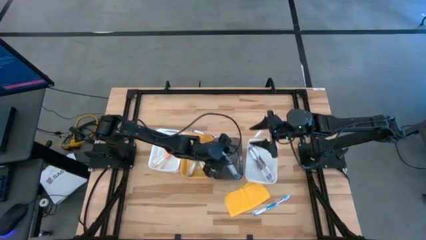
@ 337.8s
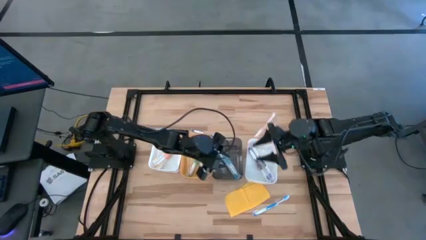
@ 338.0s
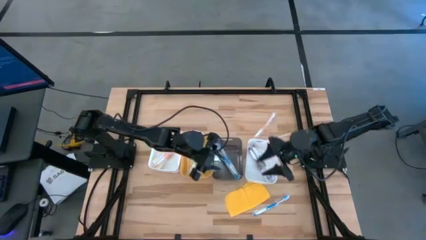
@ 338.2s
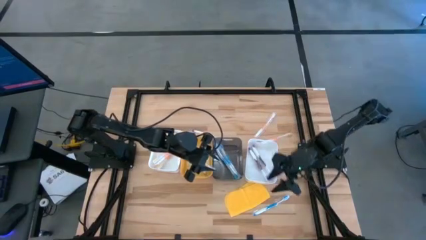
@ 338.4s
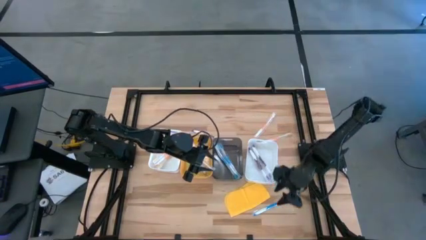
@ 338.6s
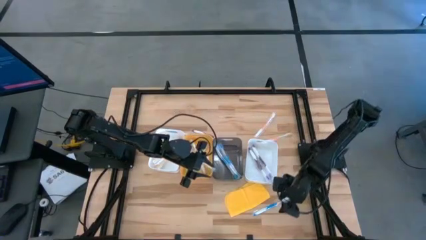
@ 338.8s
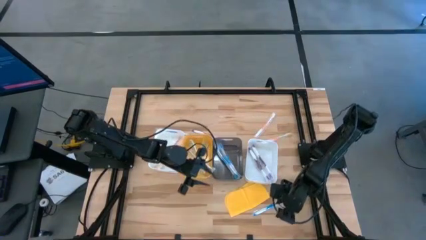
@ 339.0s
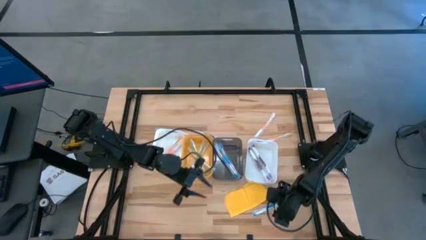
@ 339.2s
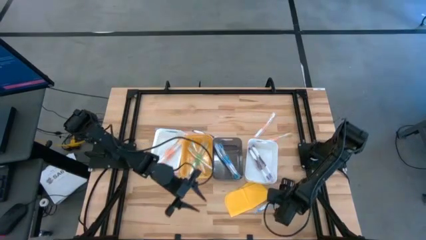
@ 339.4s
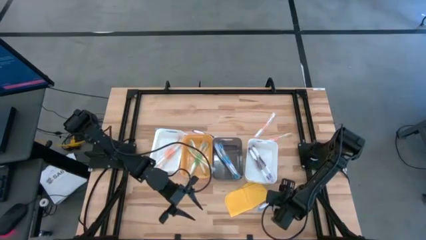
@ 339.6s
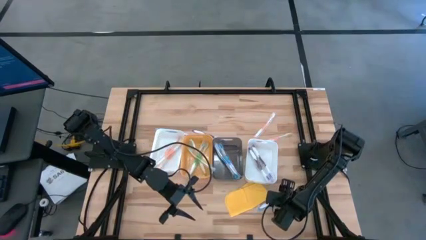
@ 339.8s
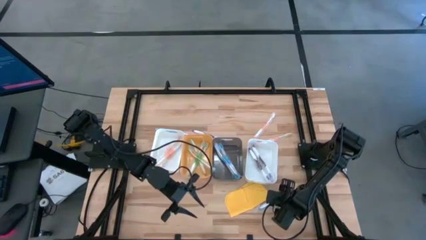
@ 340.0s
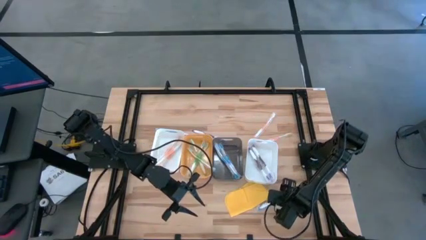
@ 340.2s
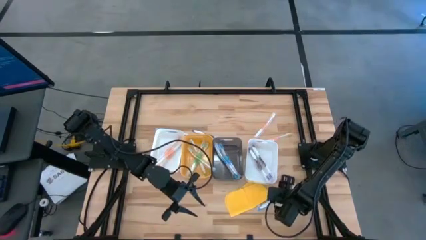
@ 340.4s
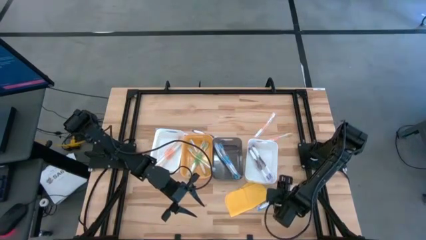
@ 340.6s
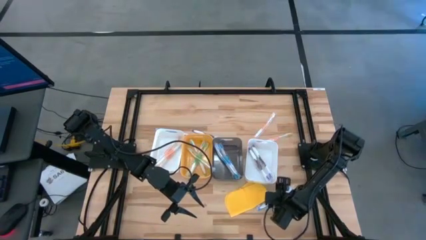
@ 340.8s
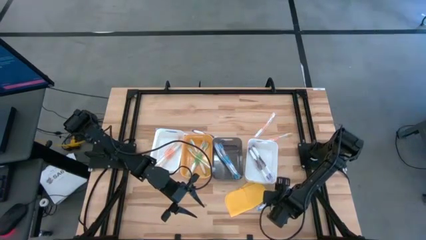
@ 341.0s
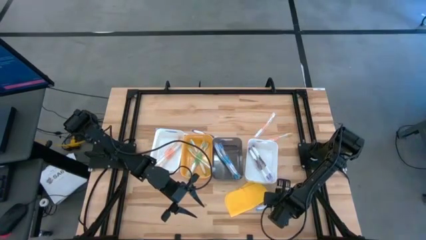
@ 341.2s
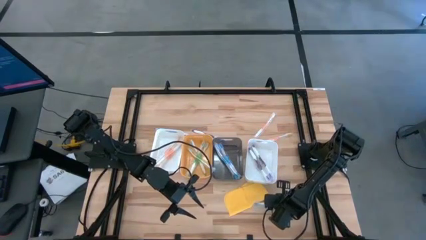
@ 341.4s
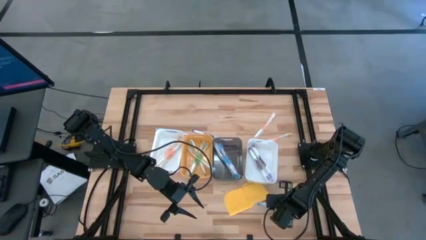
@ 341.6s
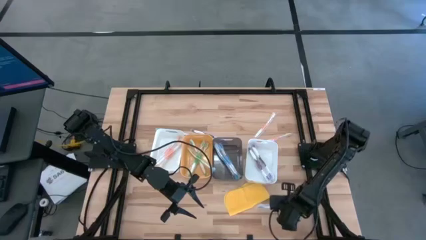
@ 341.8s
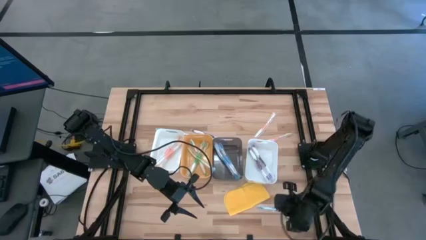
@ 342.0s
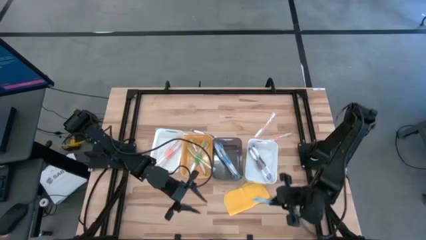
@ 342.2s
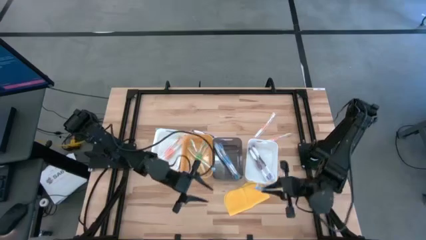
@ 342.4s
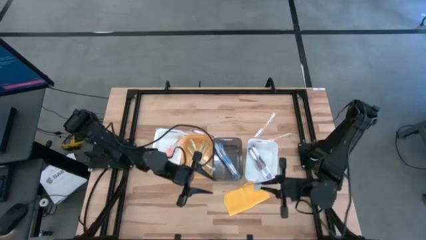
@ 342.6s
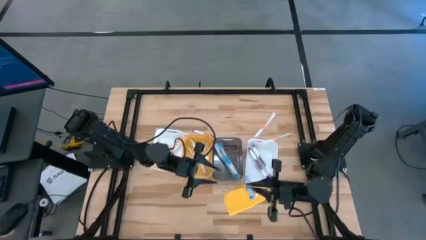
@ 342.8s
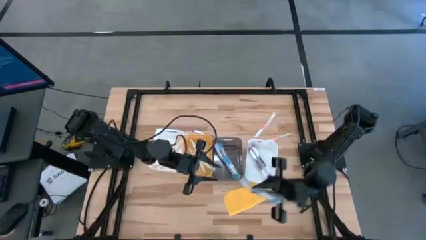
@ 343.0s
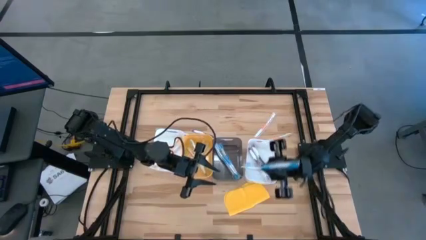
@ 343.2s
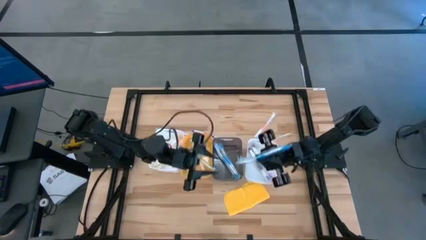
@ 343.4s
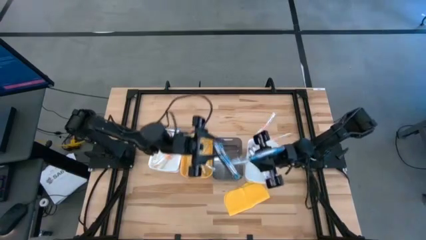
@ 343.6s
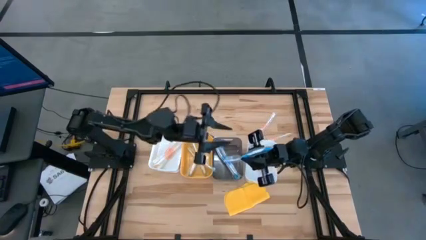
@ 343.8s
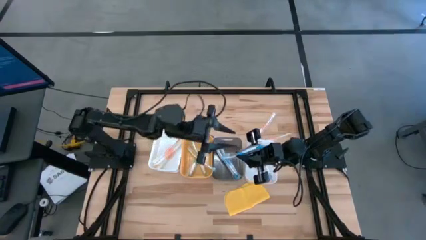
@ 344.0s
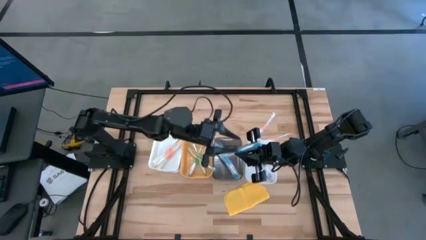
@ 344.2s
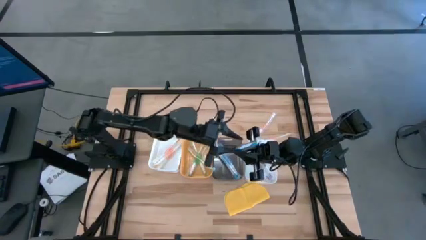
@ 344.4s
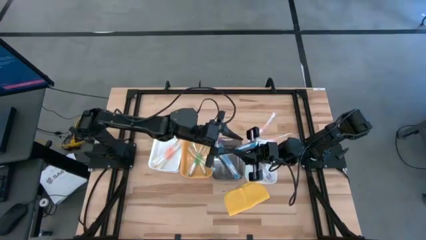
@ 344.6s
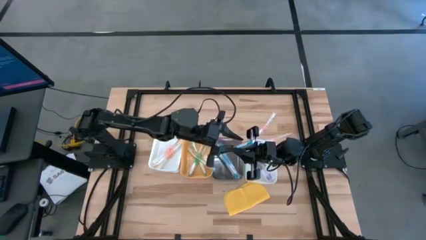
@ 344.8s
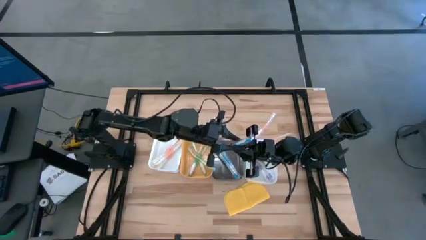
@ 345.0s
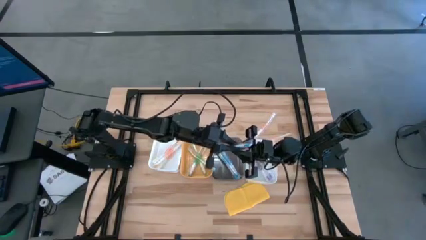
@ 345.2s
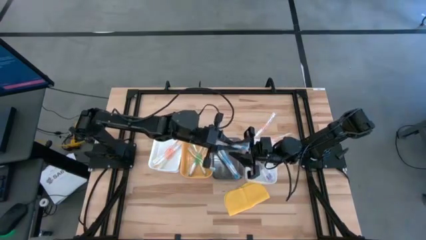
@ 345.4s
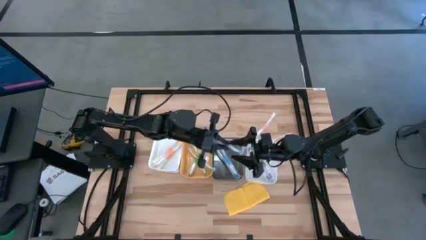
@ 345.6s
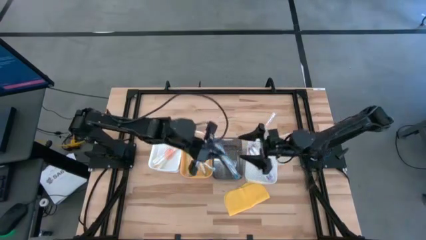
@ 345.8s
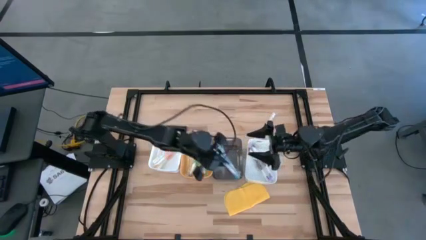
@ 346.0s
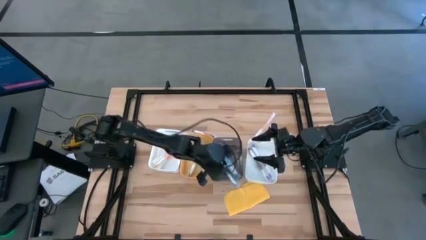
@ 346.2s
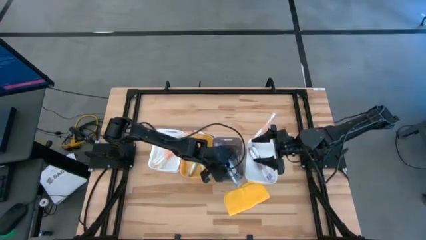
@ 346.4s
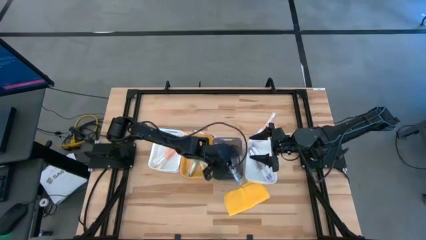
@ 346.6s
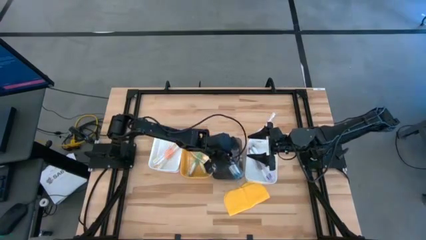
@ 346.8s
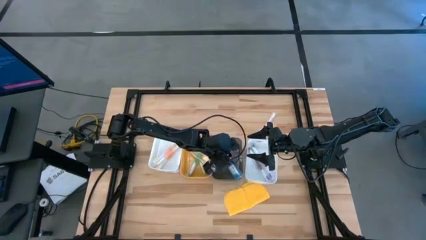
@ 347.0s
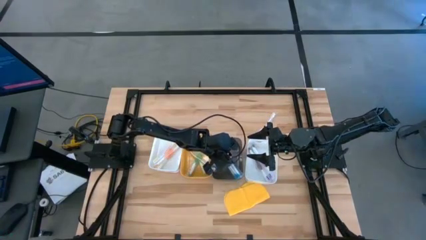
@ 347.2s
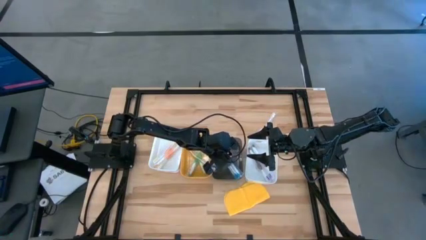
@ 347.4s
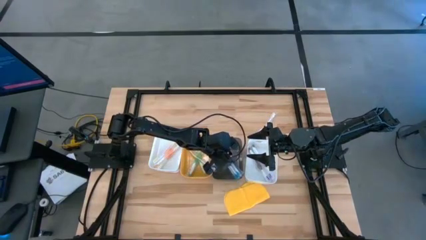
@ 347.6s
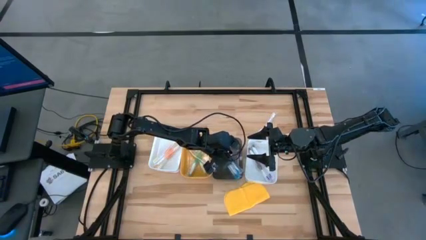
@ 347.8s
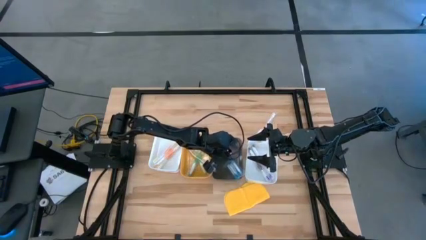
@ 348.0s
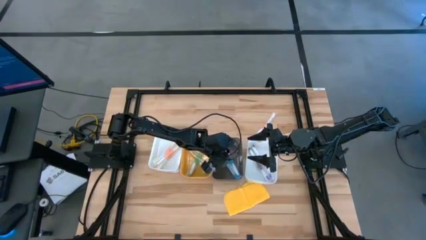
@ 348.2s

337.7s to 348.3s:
Task: Pick & Place Toothbrushes
Put the blue toothbrush into the black bin
